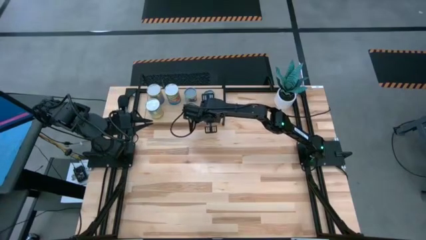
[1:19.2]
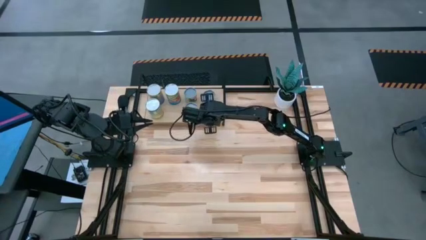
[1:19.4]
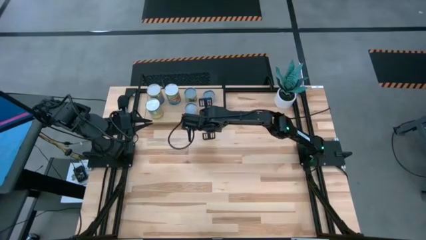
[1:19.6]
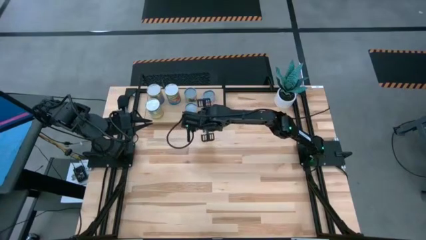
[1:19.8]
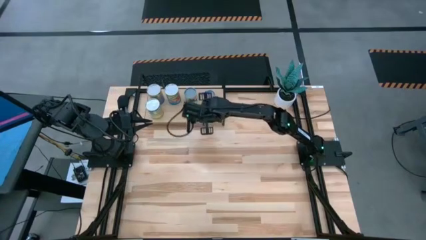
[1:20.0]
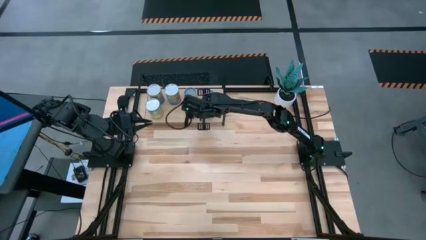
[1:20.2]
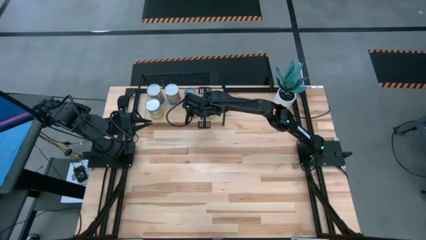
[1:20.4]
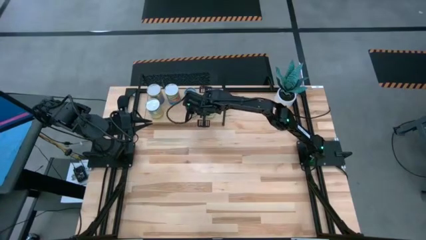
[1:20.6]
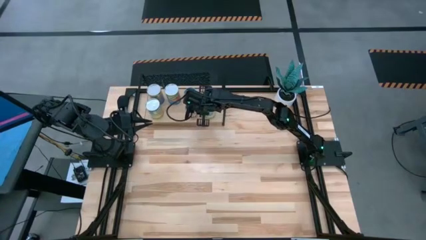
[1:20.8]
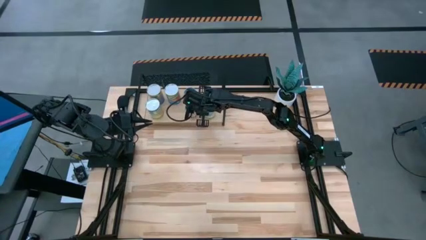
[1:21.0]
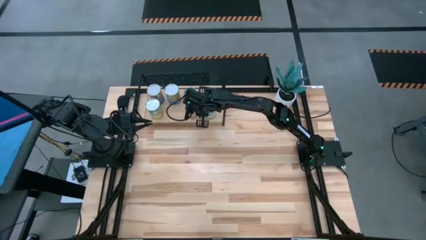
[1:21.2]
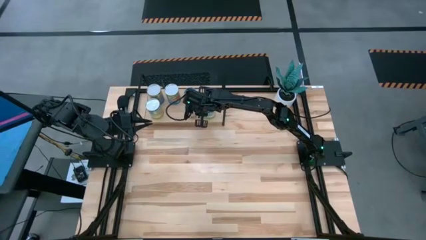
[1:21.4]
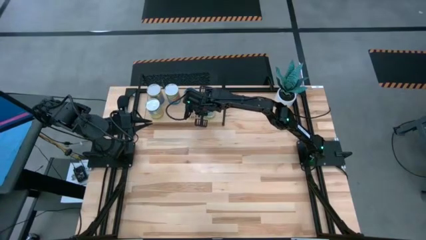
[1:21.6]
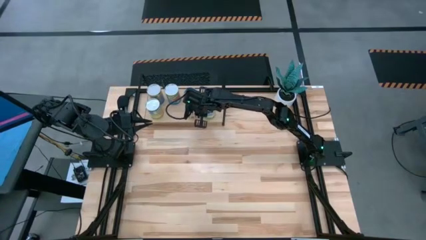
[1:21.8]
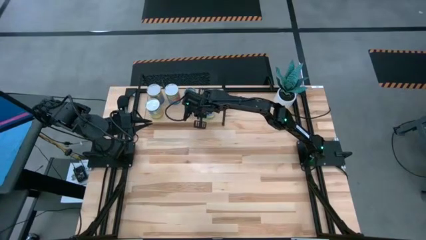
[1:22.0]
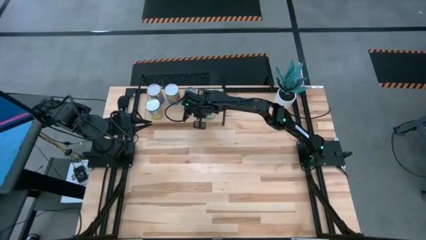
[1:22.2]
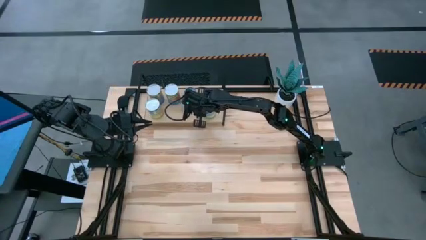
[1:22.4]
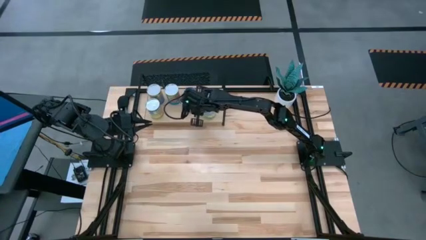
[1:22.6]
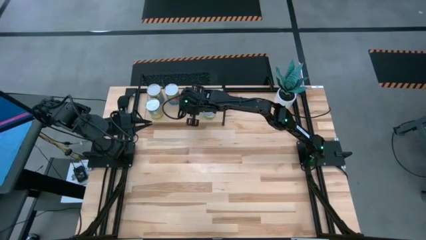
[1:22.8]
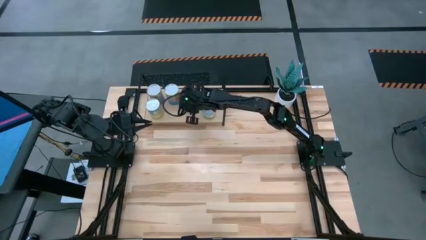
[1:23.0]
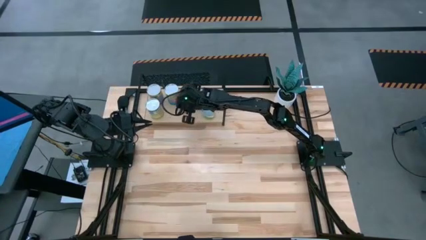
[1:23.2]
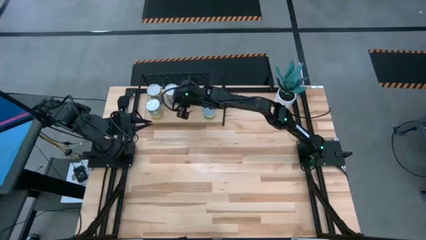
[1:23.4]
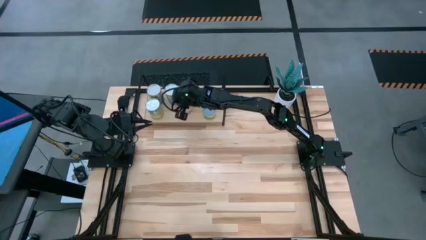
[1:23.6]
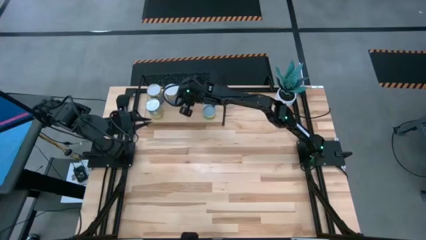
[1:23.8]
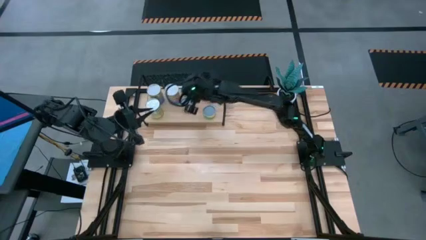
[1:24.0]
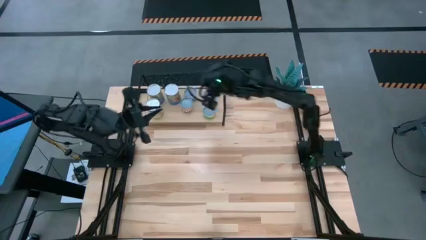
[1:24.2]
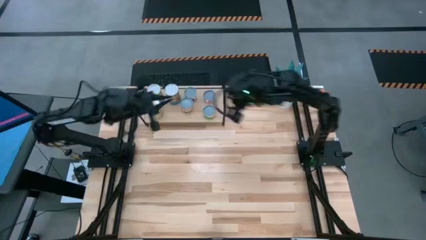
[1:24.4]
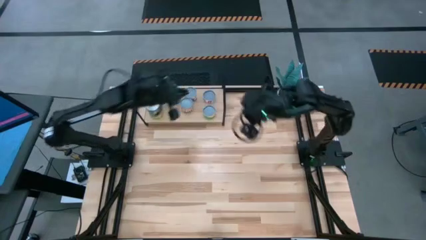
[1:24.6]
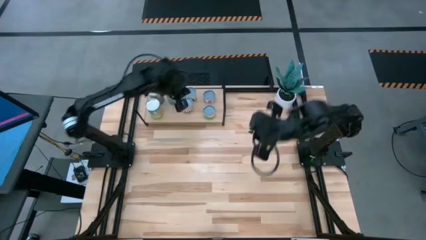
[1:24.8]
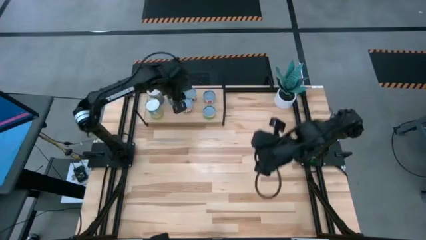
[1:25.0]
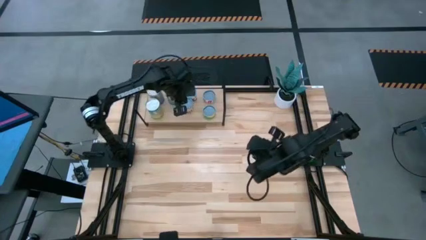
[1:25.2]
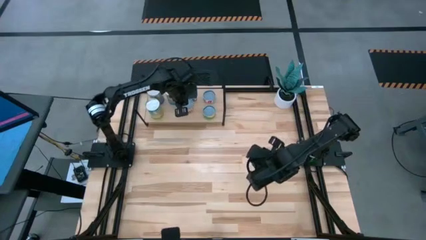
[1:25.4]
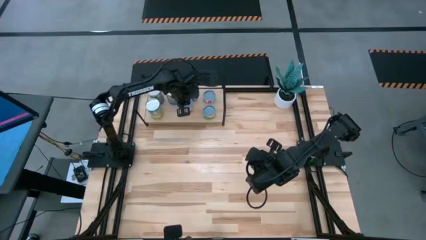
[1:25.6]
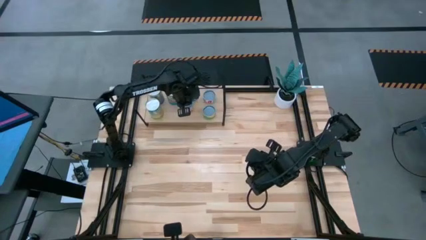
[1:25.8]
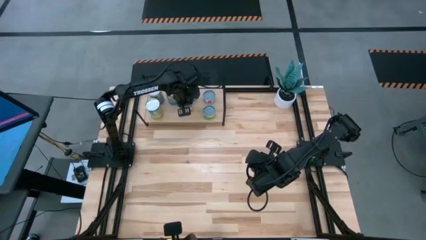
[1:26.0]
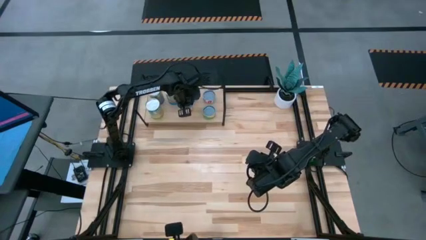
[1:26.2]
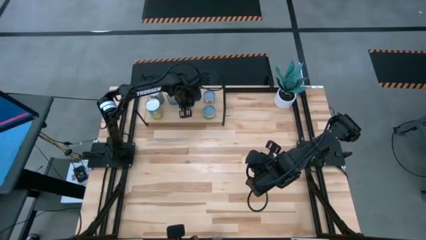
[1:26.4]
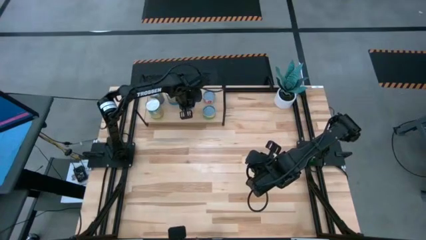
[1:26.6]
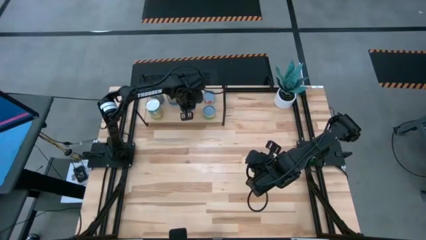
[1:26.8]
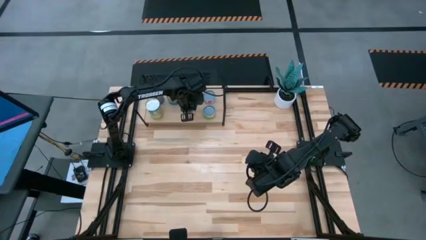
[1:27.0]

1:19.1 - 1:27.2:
Task: Pick and place cans onto a shelf
Adjust the black beans can on the shelf

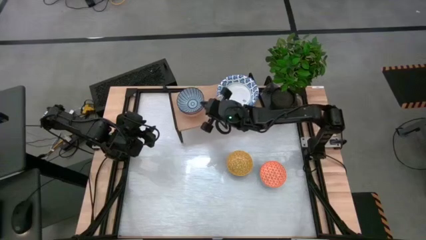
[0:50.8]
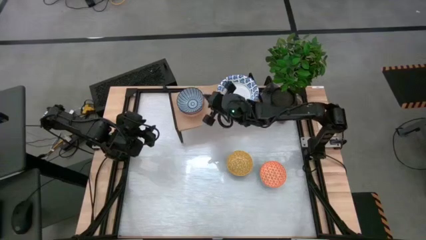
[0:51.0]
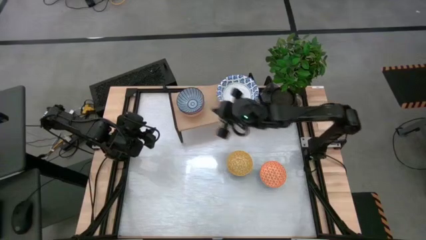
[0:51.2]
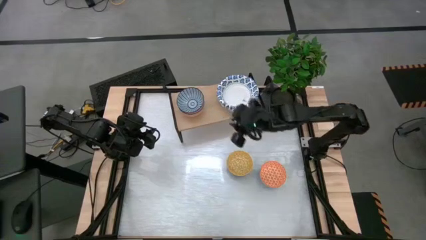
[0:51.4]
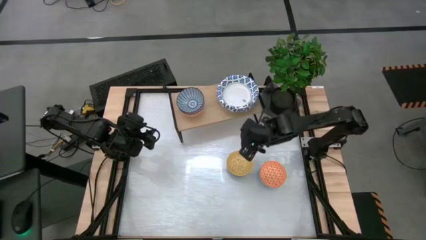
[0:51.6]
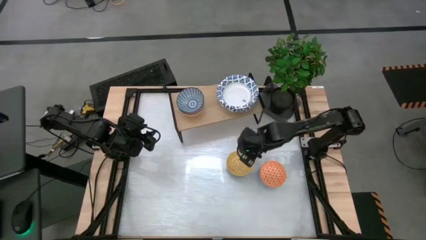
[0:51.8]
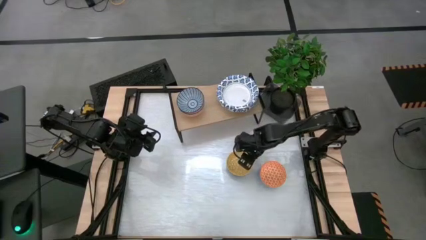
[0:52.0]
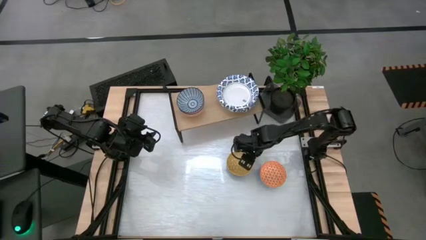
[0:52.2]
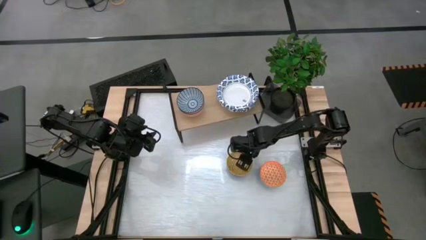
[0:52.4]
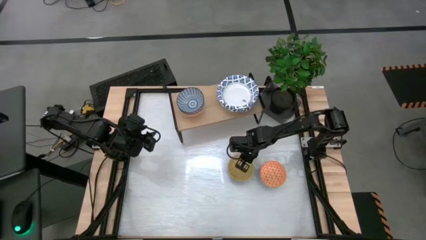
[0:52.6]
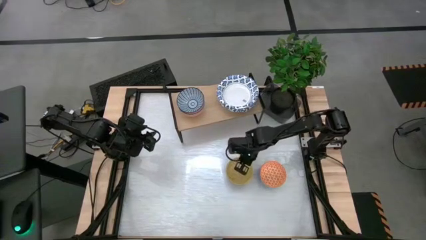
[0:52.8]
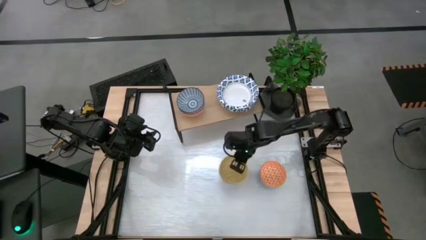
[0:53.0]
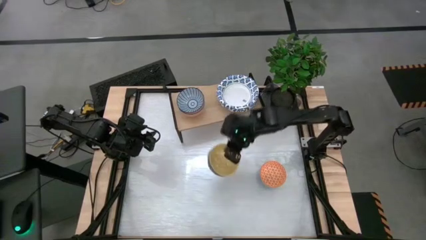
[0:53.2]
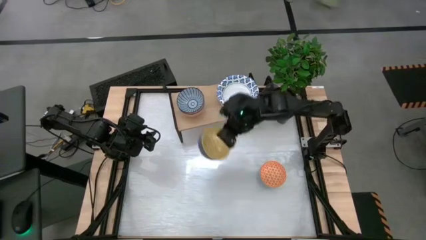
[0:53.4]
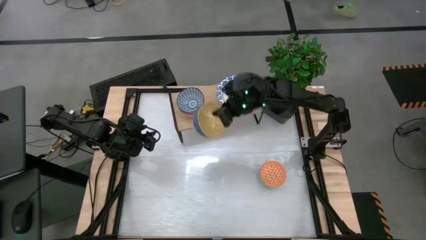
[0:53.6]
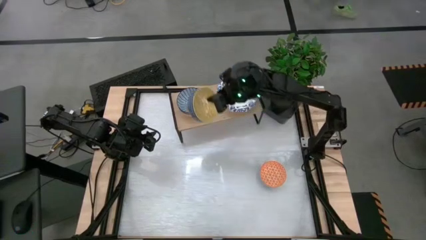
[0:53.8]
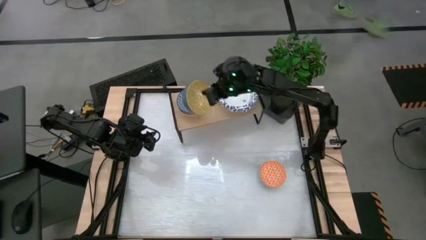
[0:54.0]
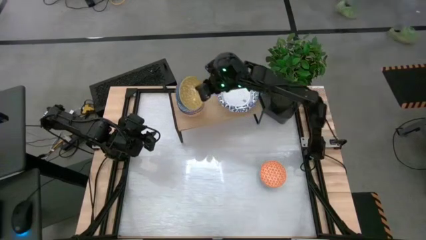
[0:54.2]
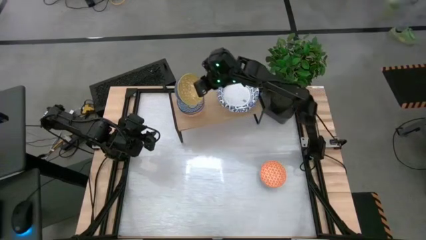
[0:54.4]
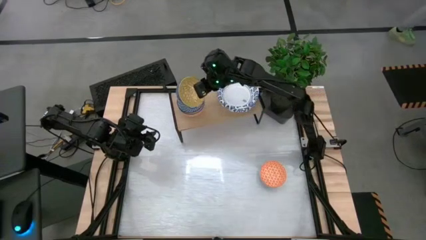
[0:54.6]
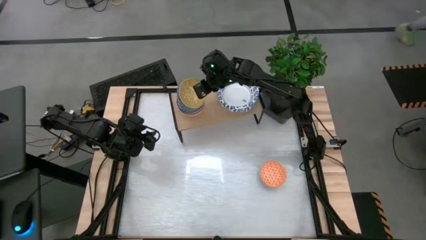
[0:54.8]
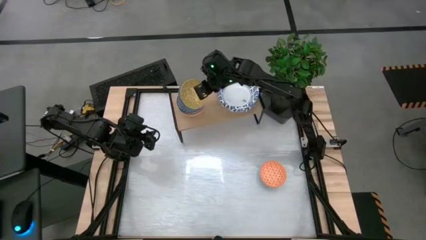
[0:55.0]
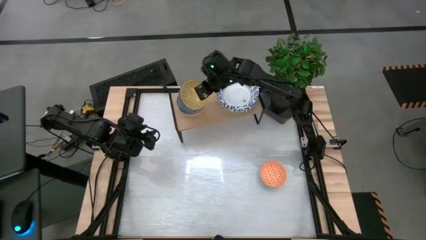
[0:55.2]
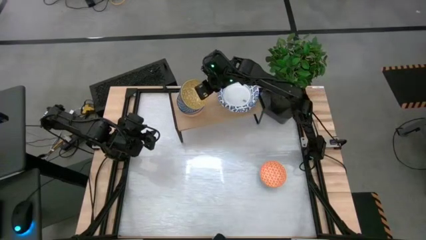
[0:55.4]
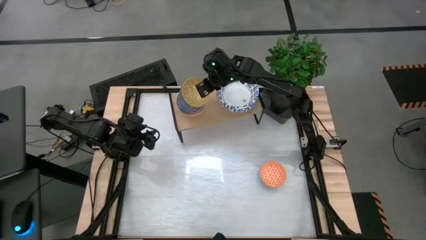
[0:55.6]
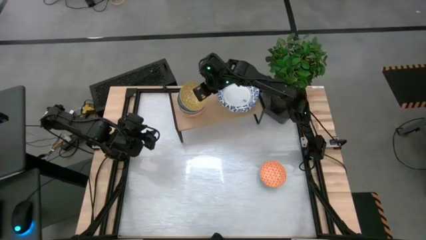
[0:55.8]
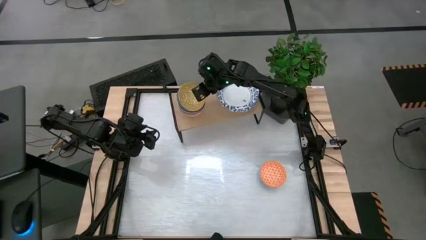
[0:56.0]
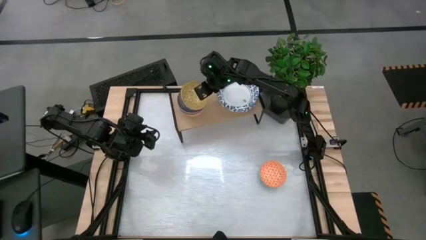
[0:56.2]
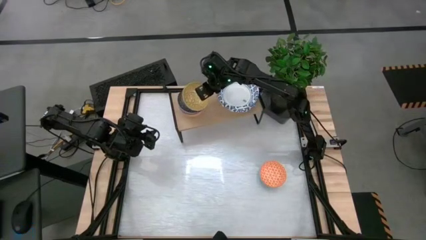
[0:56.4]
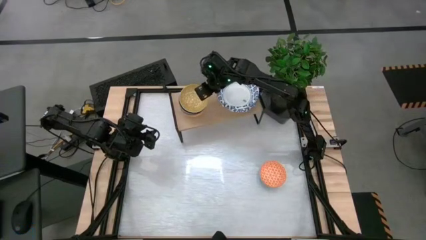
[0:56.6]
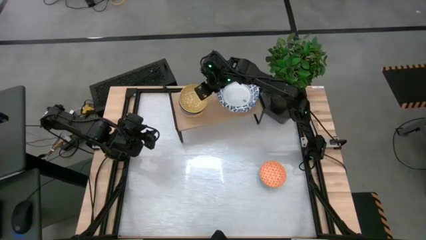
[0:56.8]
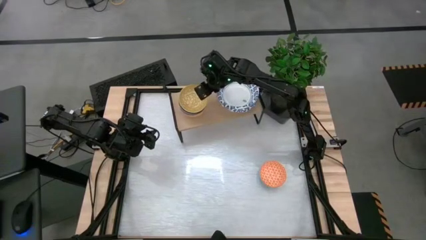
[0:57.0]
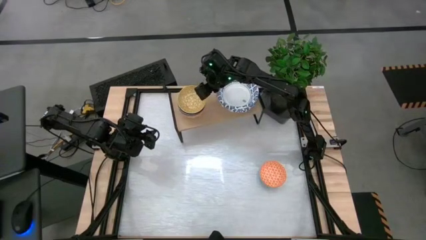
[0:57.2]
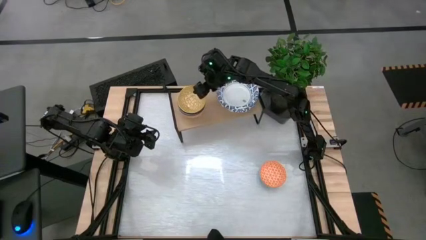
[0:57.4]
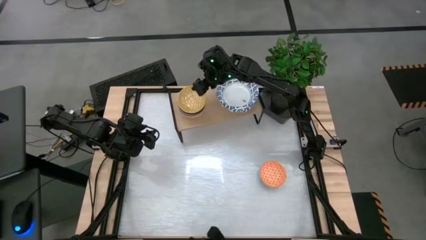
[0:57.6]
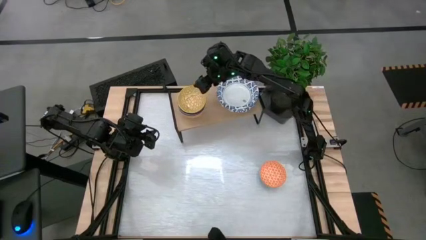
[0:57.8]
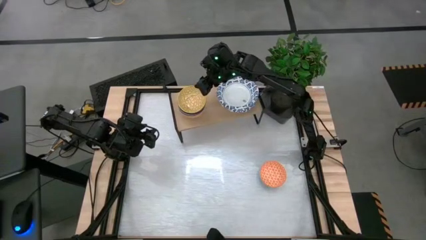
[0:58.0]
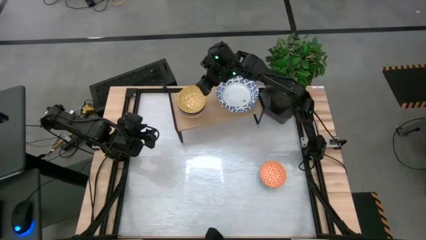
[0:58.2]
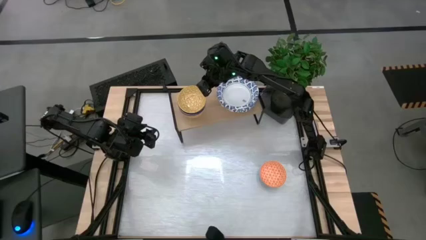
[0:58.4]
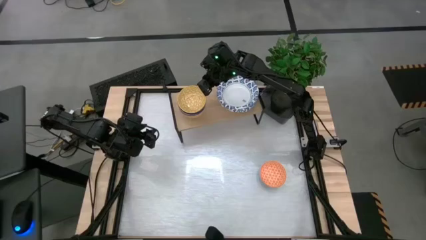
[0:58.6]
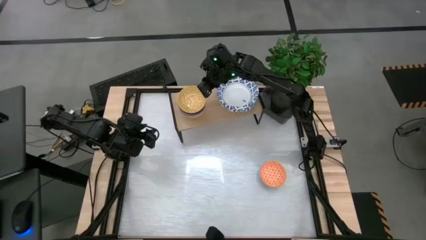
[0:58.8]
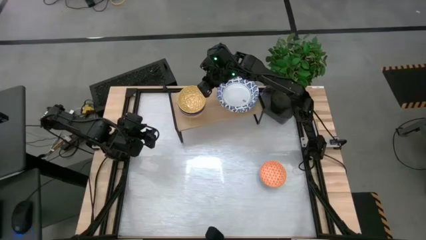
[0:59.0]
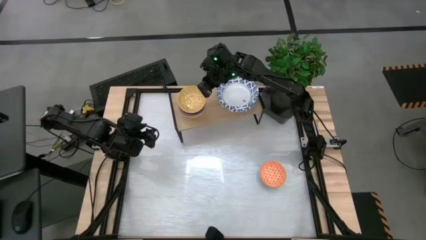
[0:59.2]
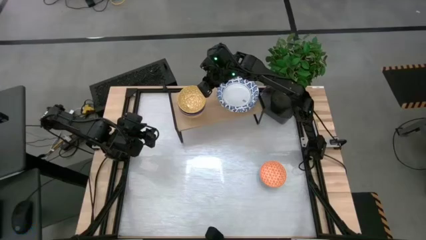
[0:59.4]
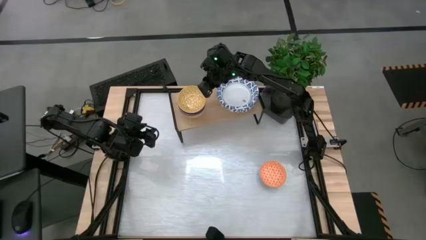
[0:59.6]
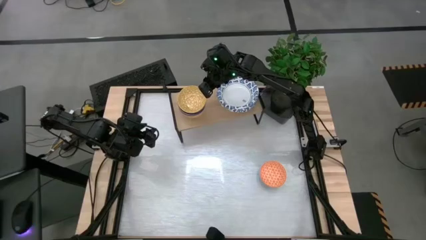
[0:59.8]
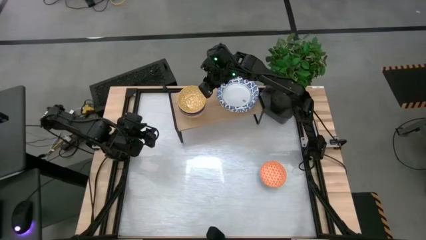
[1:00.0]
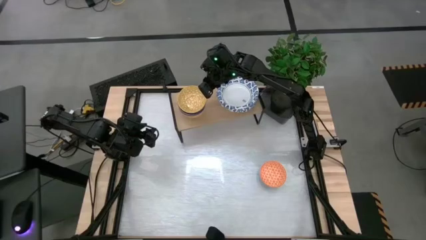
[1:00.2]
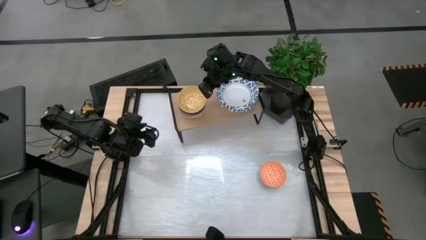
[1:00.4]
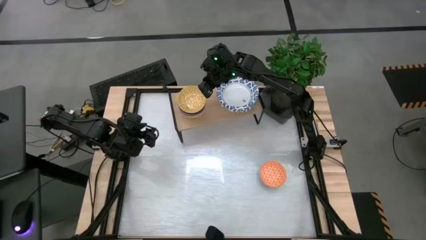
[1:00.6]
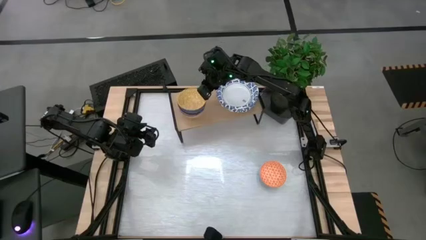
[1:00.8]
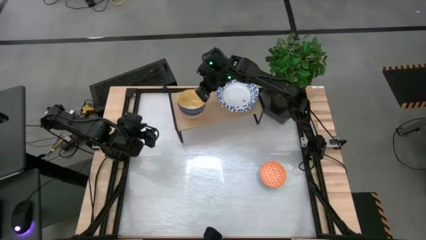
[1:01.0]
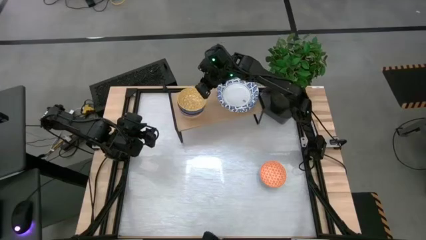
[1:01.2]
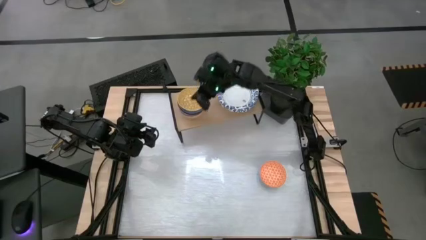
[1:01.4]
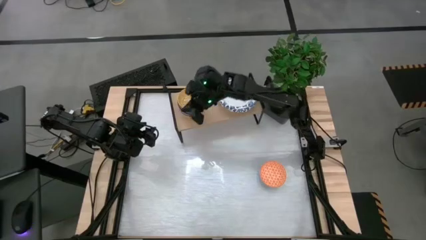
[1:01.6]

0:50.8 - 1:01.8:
Task: Place and stack bowls onto a shelf
Stack the yellow bowl on top of the blue bowl on the shelf
